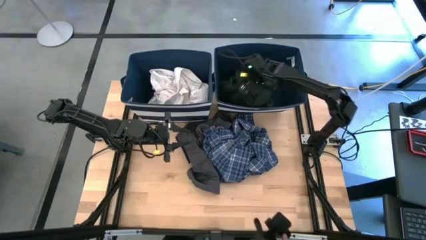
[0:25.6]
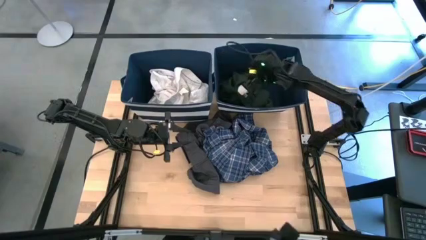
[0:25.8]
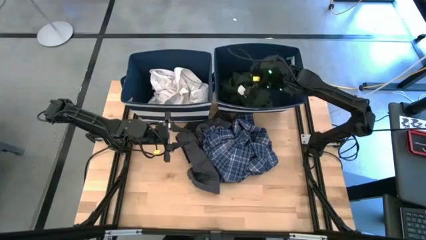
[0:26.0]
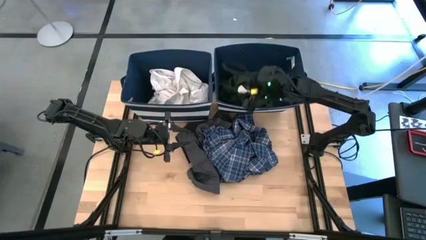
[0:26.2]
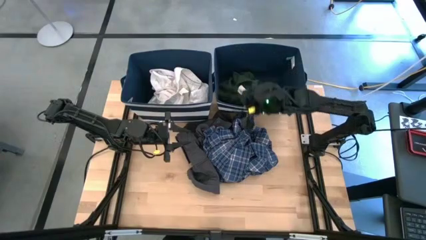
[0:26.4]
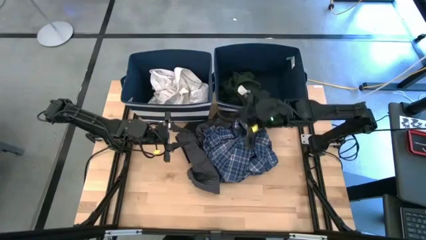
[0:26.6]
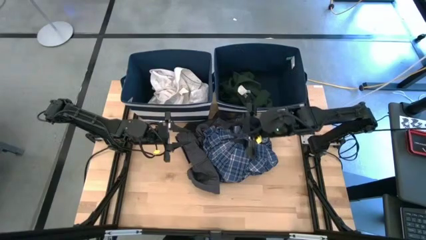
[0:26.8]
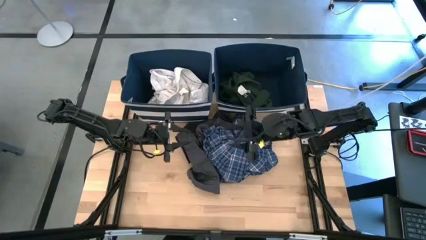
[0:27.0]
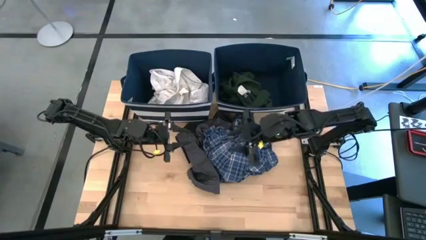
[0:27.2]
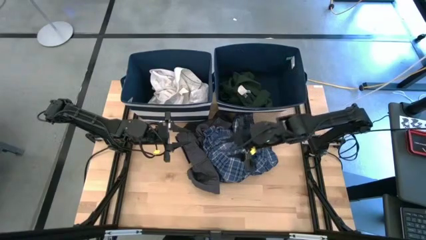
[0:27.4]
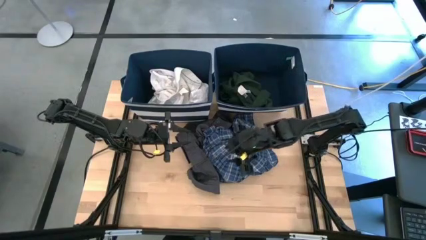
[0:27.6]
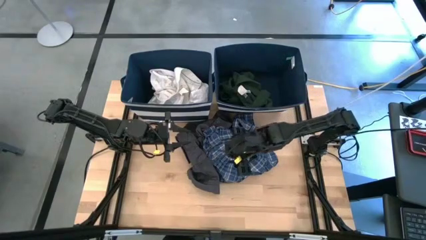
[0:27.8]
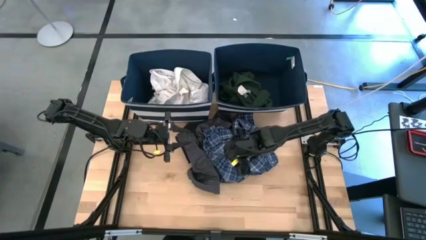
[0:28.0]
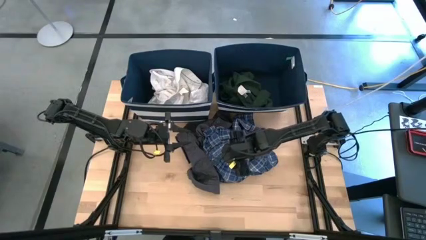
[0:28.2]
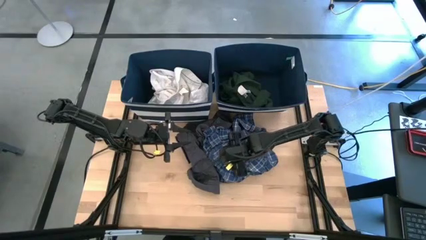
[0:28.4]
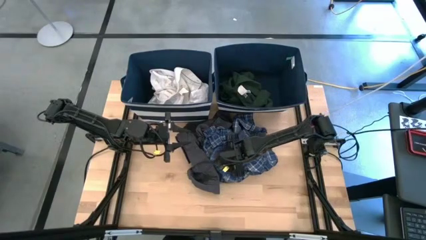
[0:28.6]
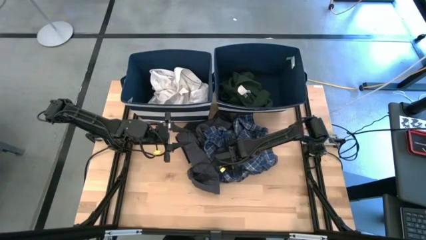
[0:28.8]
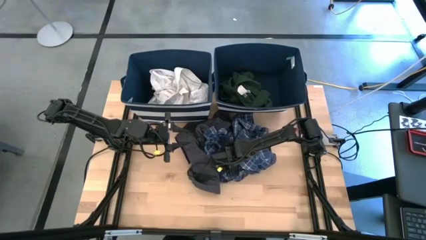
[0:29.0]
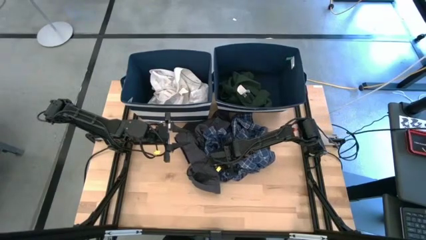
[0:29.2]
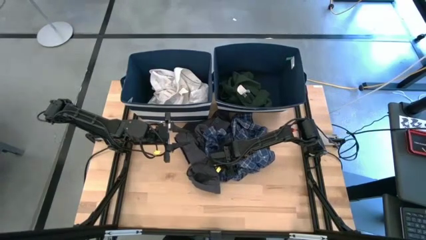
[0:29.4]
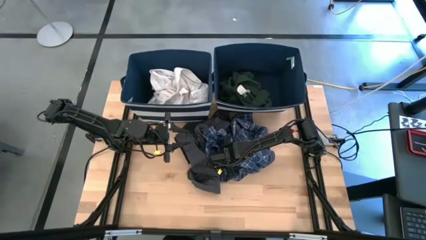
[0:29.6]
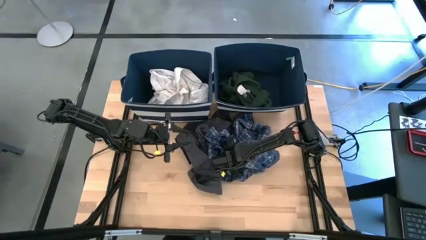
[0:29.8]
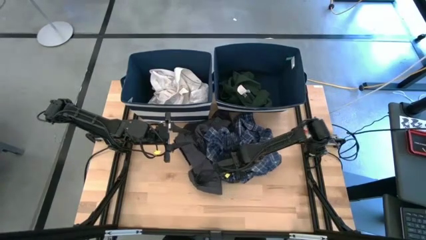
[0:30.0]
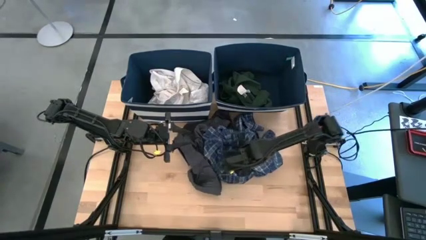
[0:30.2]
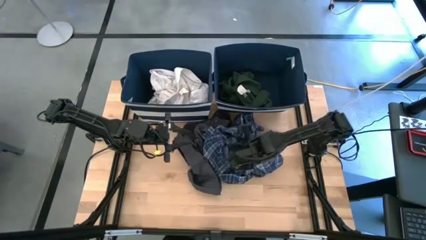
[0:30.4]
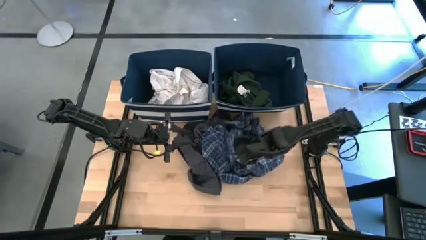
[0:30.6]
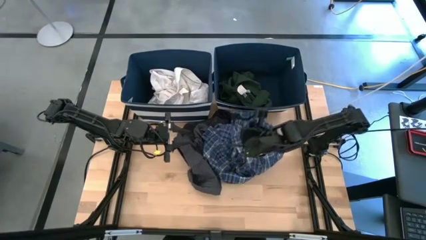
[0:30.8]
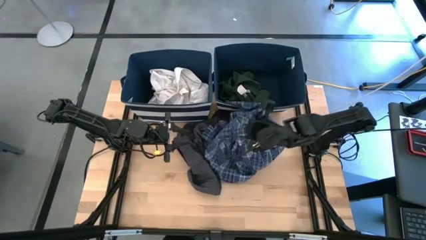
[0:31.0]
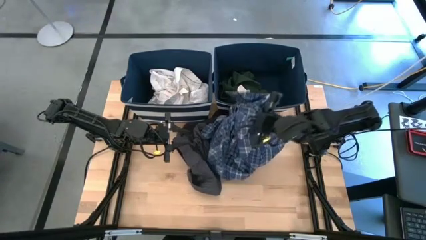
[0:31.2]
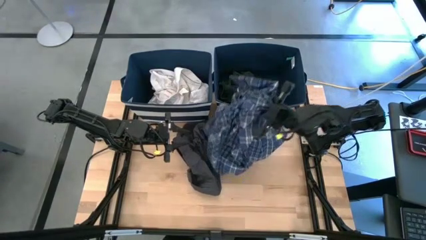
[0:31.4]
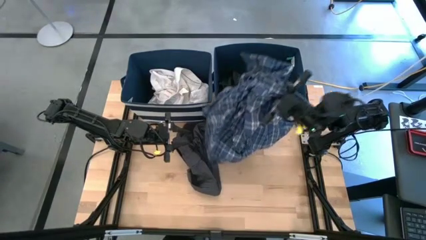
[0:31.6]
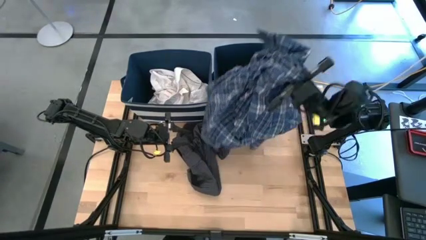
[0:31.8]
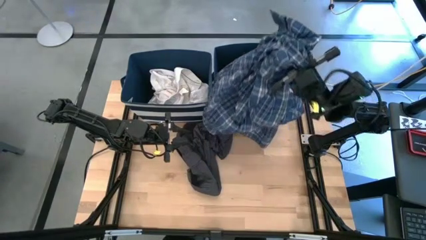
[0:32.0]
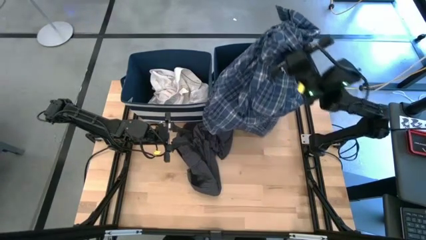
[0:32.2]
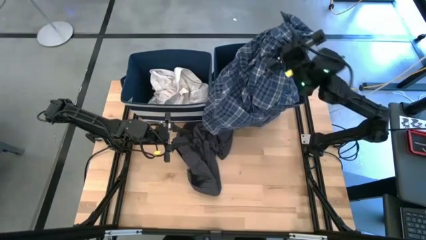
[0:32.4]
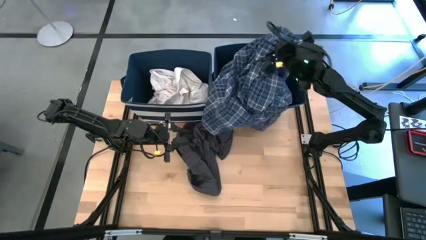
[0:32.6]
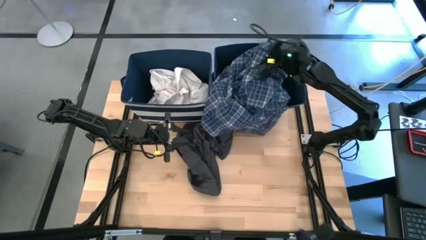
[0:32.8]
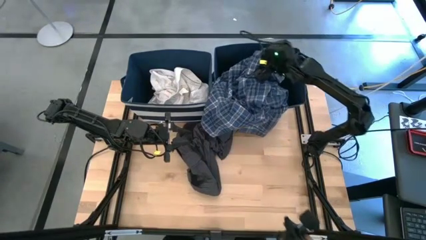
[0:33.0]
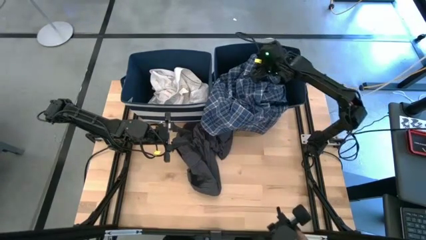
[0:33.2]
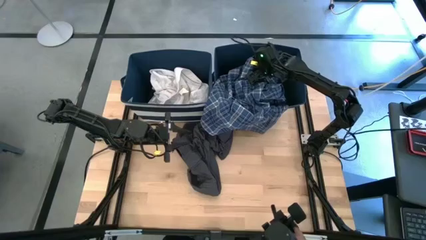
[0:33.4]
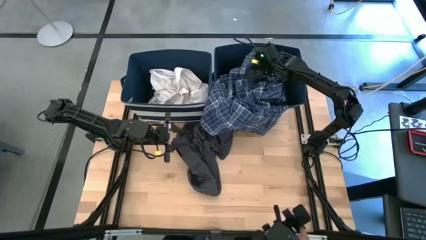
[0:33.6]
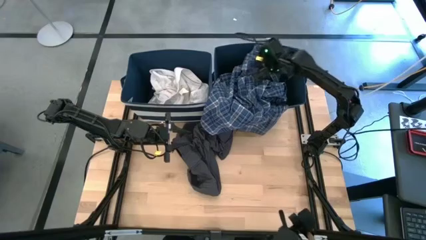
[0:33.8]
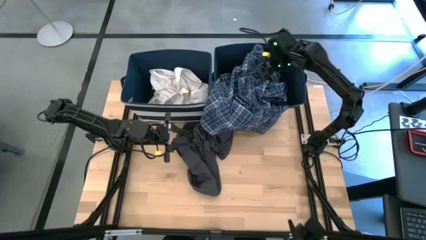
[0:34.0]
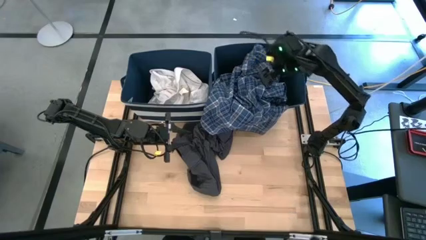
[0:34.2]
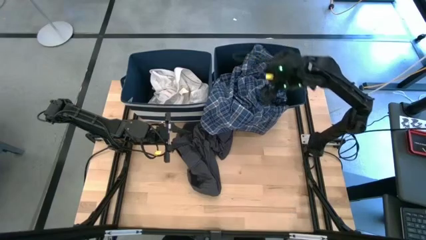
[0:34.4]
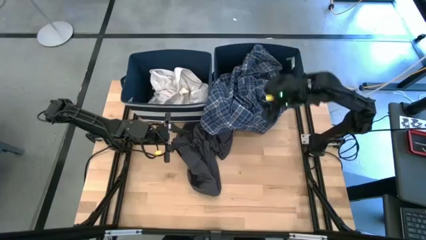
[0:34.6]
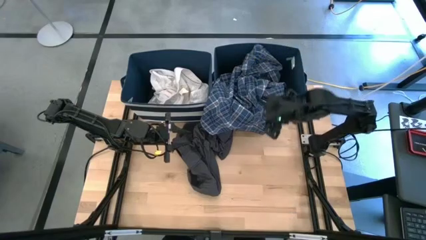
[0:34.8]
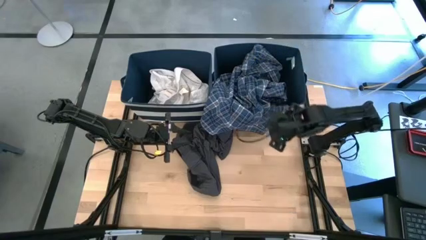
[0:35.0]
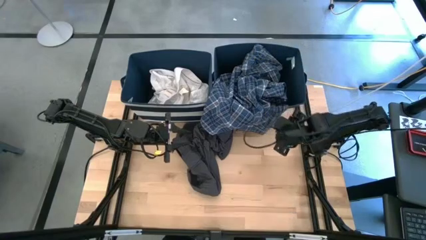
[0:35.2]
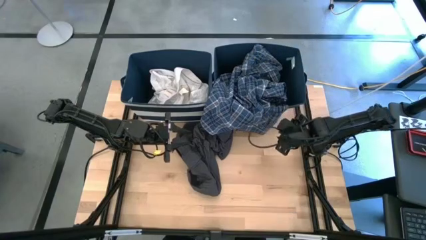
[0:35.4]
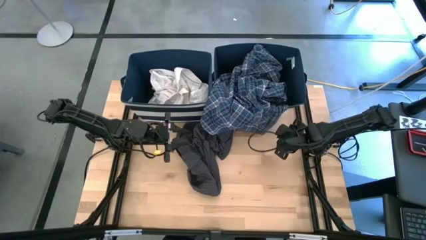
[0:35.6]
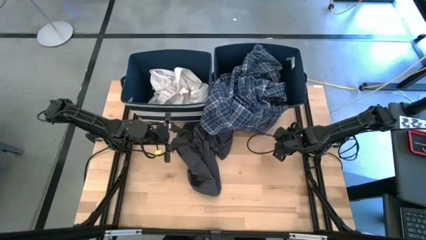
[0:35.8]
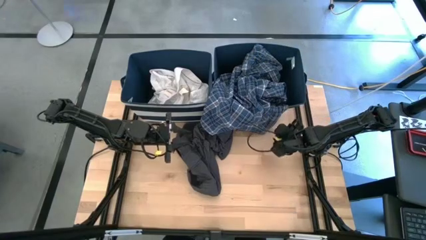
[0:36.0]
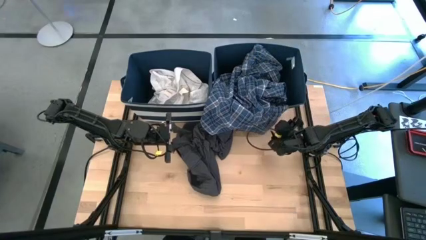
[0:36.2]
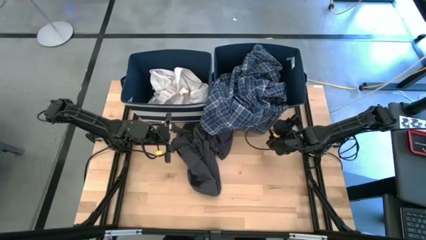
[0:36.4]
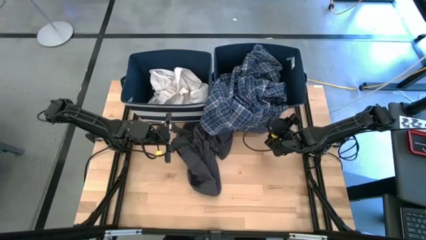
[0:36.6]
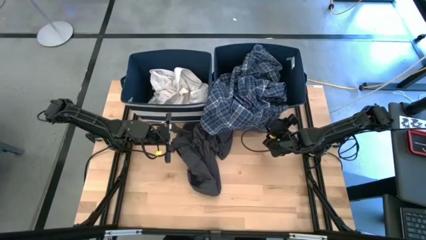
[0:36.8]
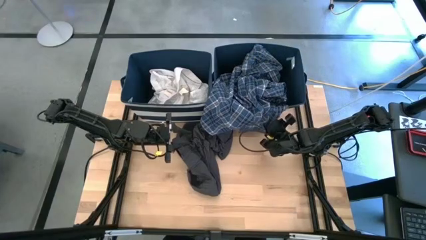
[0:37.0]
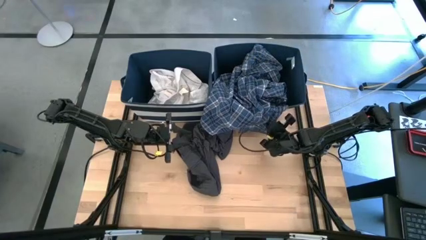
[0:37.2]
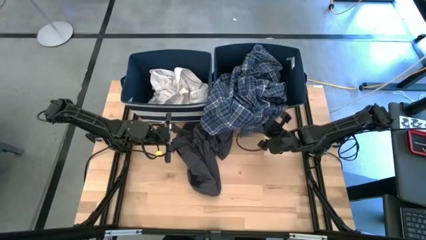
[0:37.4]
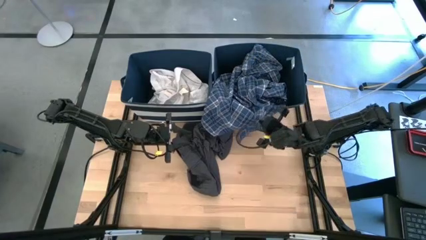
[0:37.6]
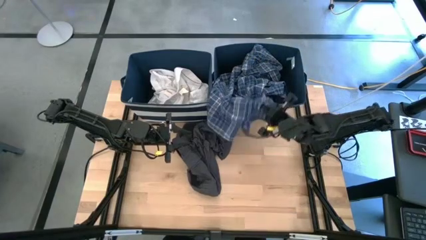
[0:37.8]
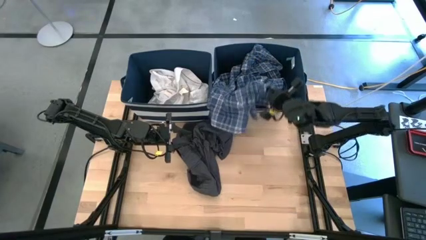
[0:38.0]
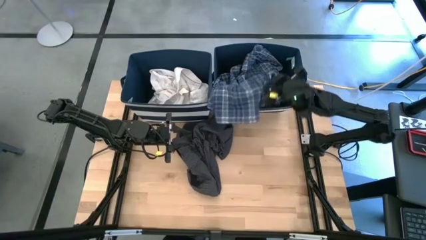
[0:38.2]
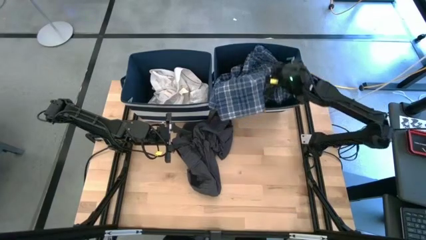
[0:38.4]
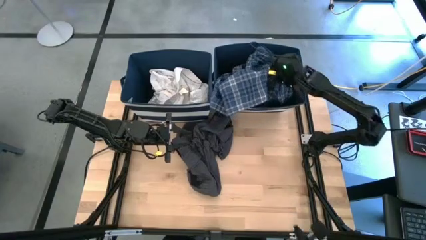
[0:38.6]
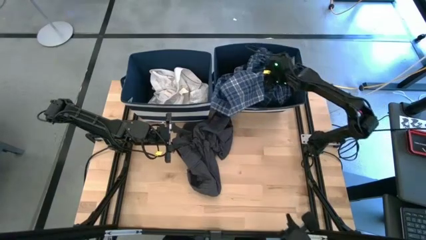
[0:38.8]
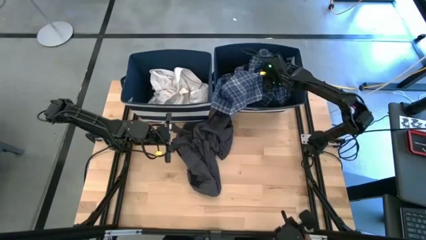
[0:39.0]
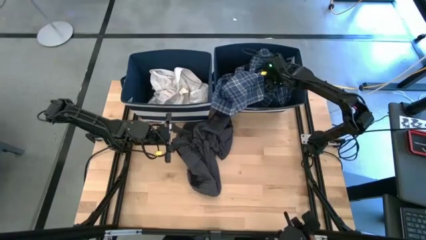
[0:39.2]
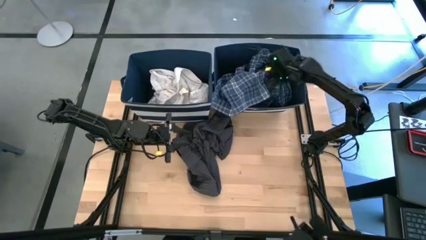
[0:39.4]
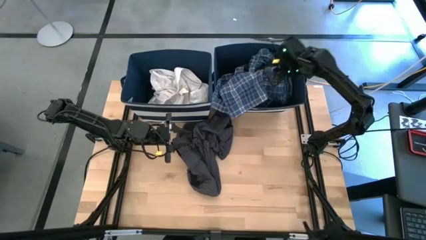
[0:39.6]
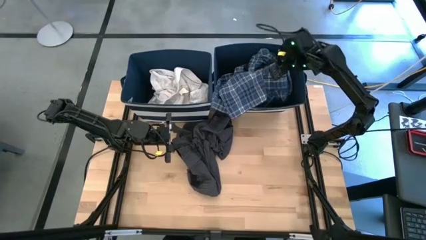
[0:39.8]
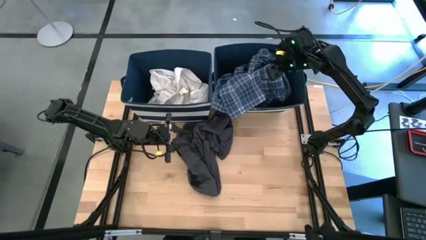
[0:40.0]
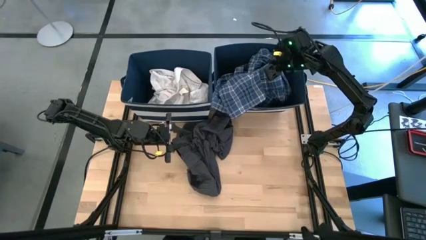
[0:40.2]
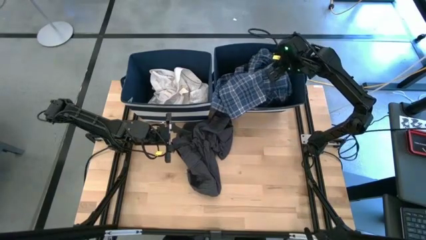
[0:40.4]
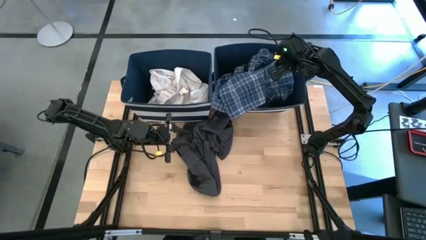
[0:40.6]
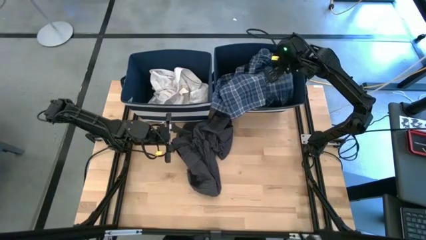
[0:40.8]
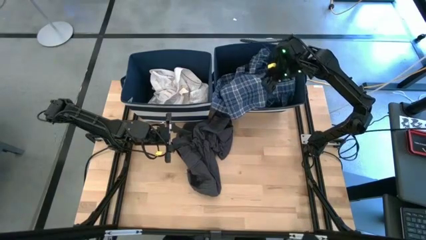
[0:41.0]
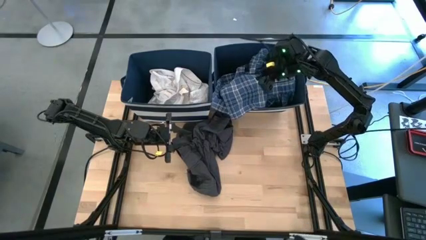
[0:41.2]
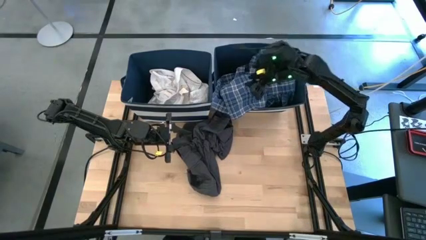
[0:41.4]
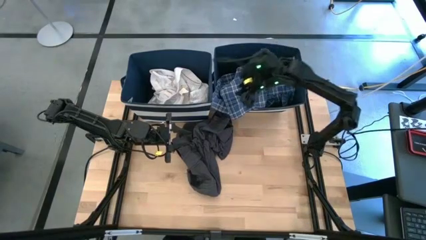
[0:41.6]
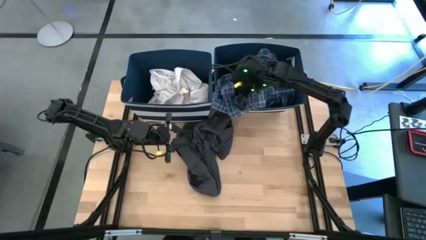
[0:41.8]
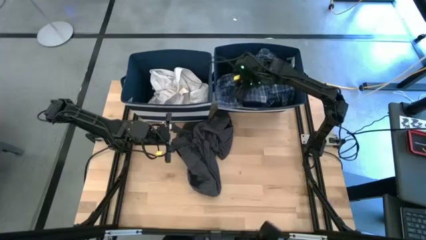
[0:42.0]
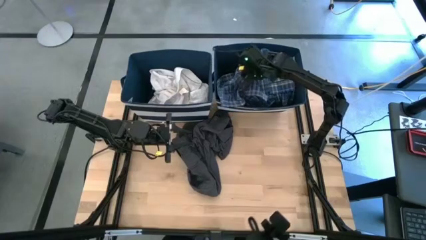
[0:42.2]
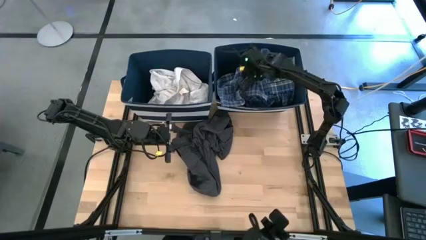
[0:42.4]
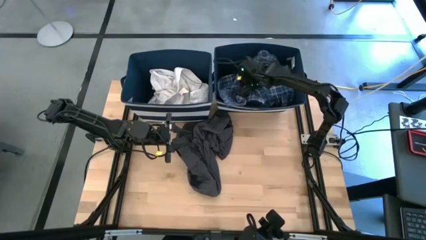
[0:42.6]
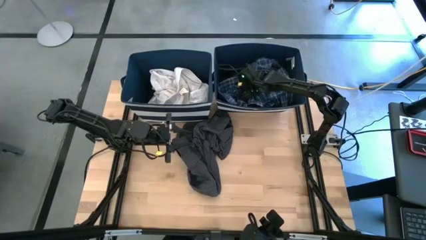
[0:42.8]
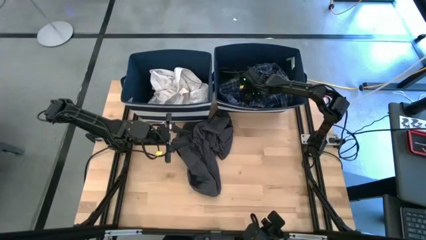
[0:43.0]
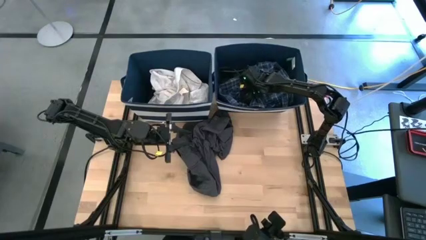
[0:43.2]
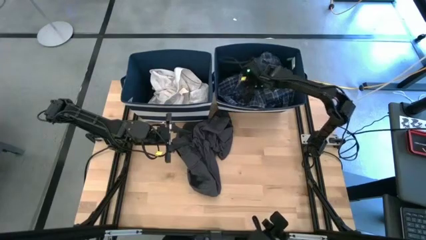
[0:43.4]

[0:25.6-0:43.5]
Task: Sort clothes
Put the blue polo shirt into the right blue laundry basket
